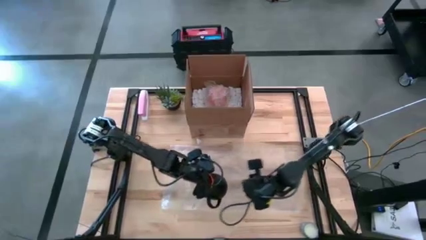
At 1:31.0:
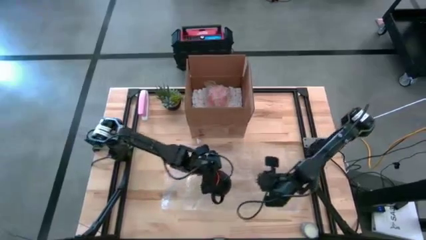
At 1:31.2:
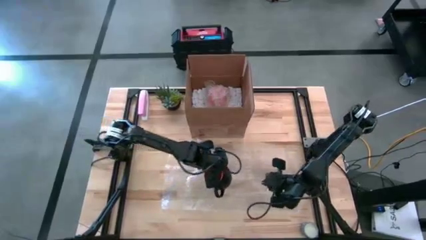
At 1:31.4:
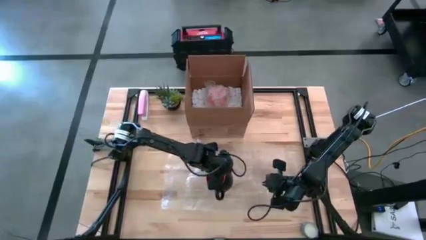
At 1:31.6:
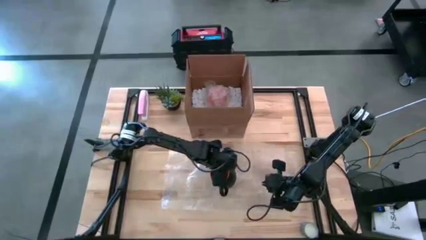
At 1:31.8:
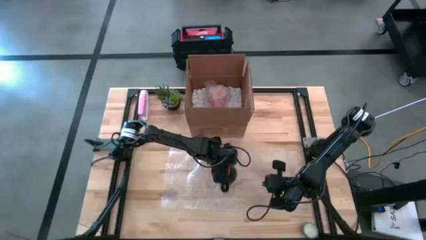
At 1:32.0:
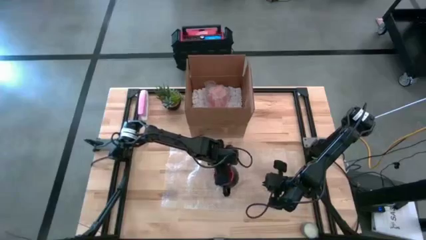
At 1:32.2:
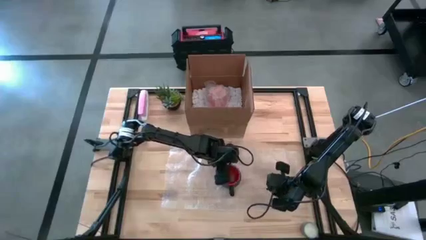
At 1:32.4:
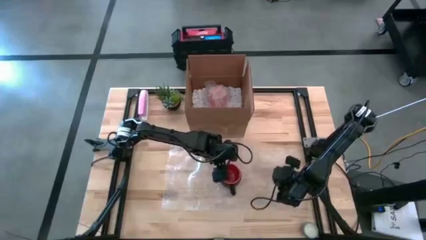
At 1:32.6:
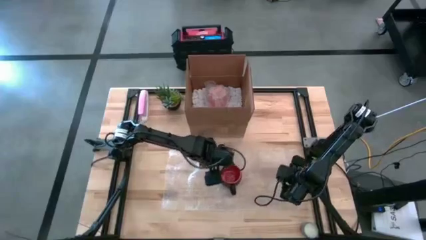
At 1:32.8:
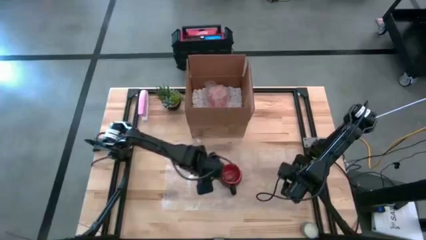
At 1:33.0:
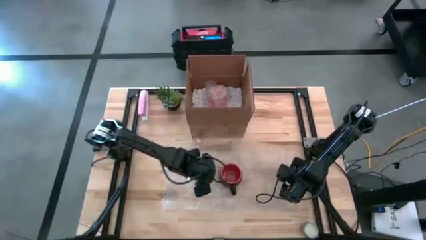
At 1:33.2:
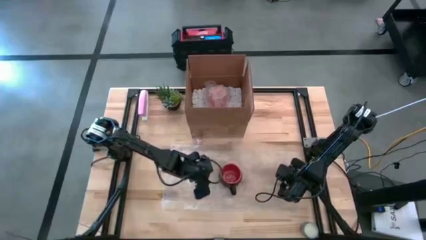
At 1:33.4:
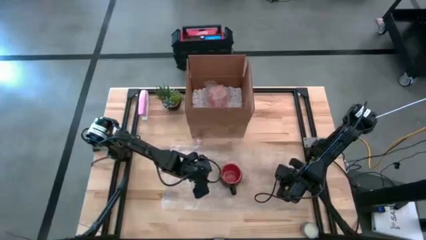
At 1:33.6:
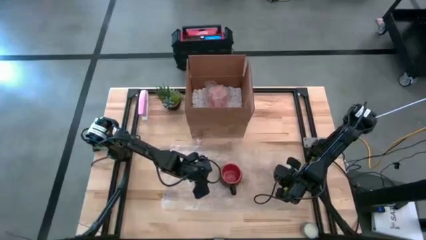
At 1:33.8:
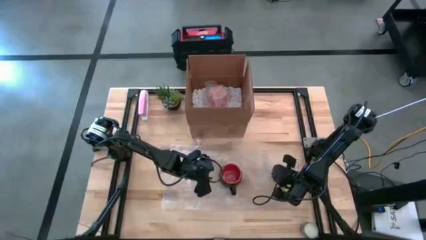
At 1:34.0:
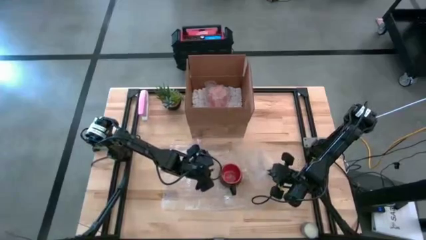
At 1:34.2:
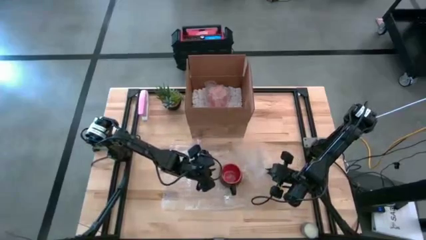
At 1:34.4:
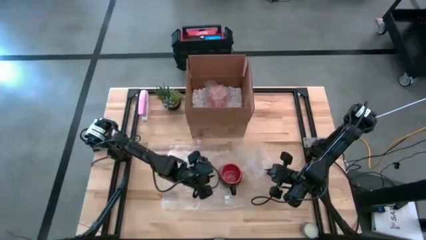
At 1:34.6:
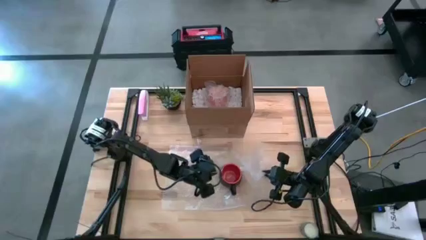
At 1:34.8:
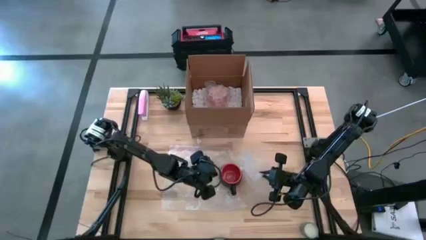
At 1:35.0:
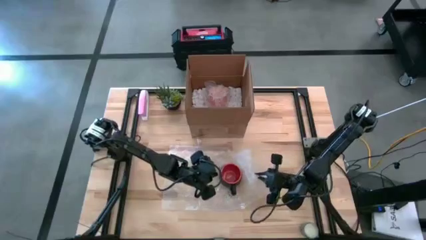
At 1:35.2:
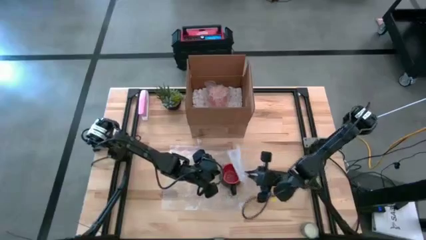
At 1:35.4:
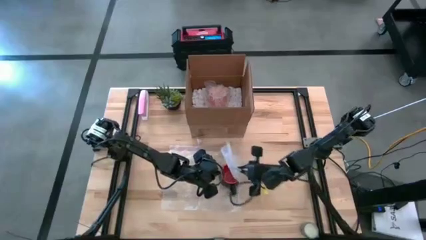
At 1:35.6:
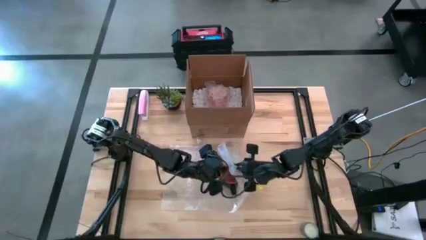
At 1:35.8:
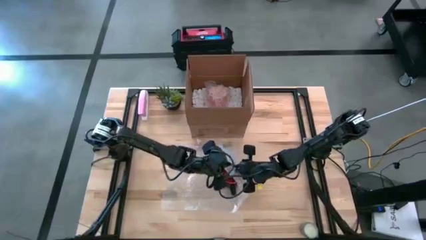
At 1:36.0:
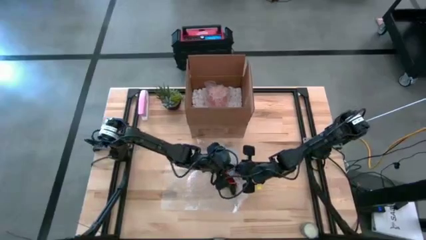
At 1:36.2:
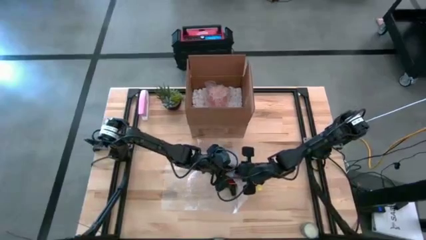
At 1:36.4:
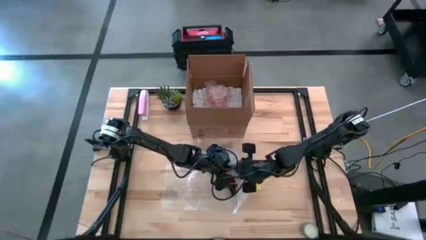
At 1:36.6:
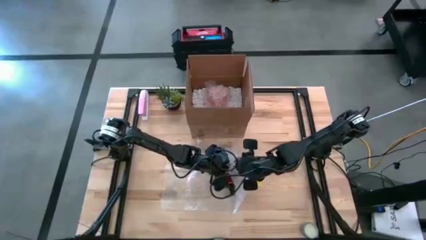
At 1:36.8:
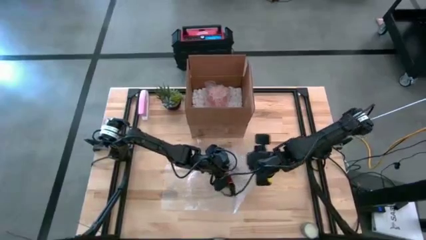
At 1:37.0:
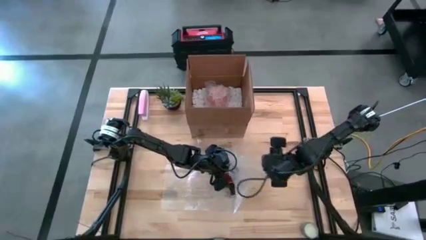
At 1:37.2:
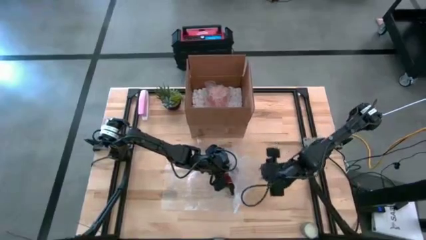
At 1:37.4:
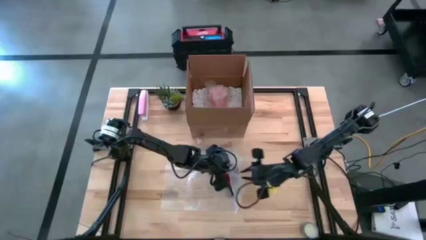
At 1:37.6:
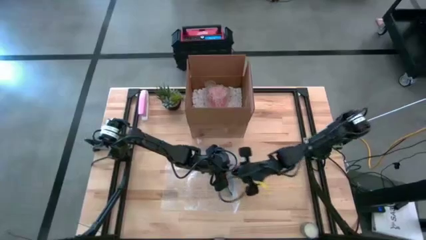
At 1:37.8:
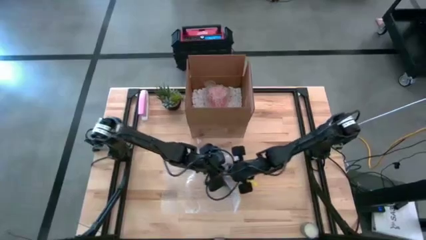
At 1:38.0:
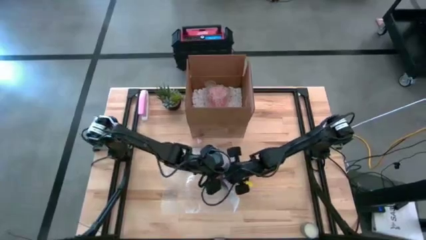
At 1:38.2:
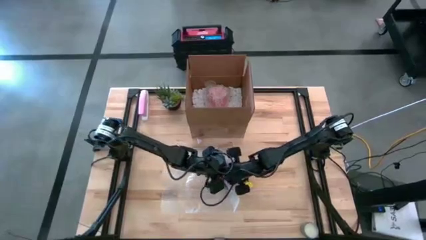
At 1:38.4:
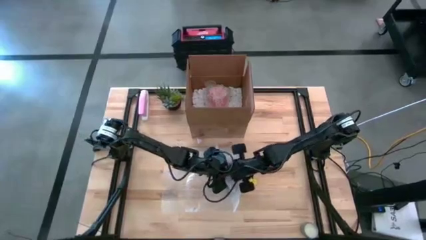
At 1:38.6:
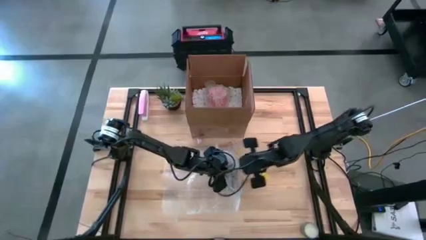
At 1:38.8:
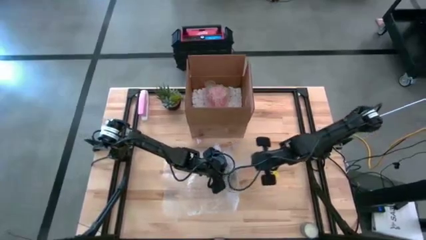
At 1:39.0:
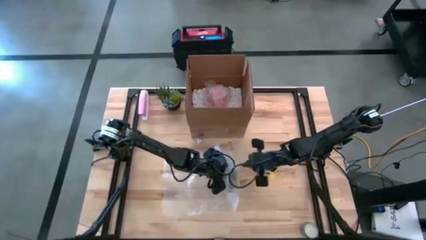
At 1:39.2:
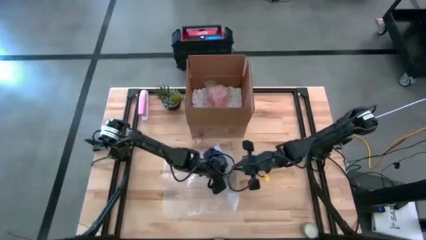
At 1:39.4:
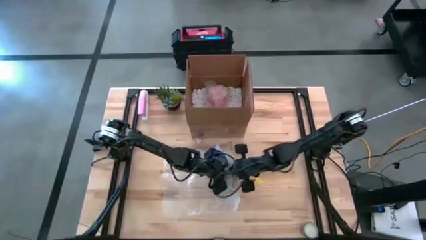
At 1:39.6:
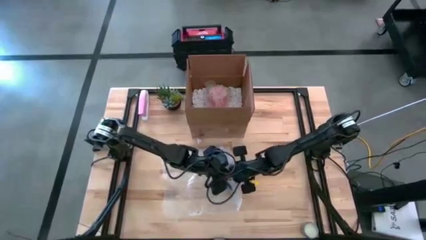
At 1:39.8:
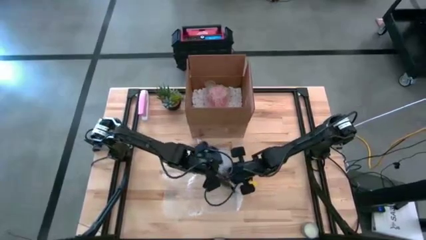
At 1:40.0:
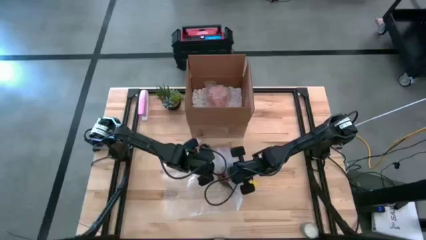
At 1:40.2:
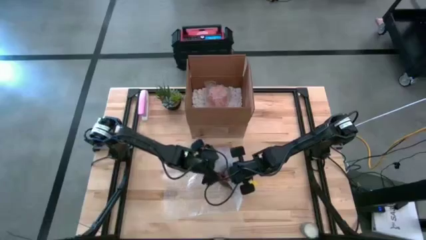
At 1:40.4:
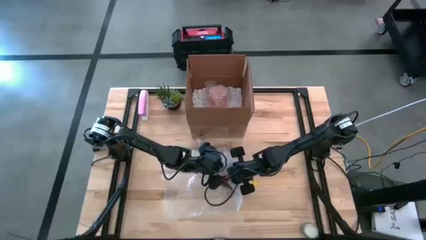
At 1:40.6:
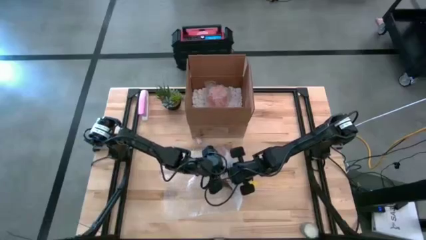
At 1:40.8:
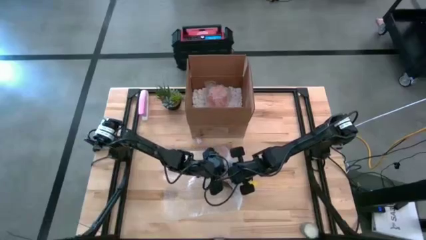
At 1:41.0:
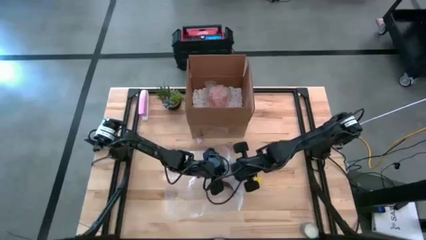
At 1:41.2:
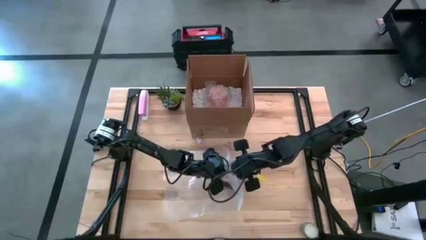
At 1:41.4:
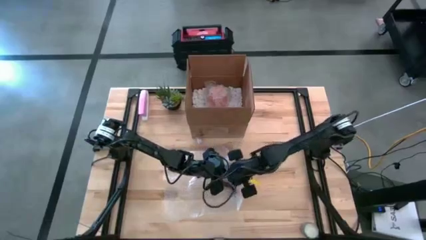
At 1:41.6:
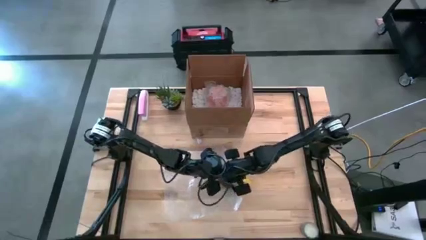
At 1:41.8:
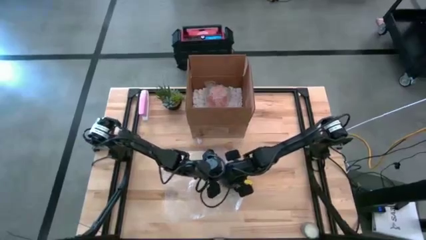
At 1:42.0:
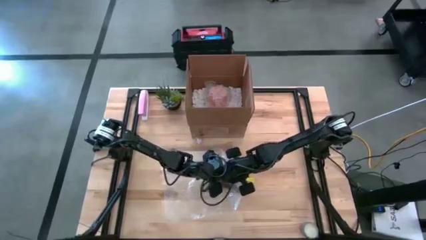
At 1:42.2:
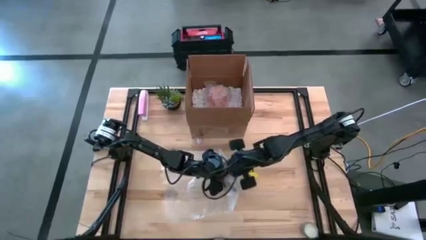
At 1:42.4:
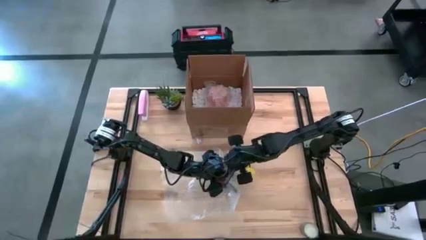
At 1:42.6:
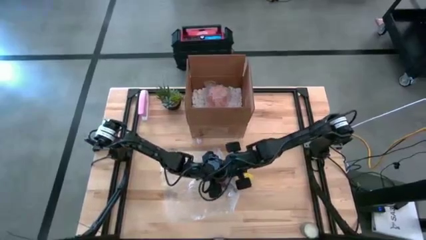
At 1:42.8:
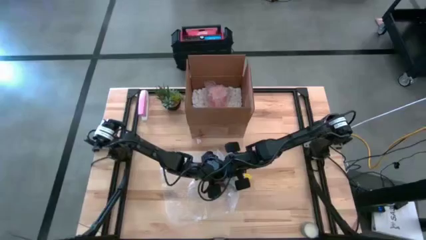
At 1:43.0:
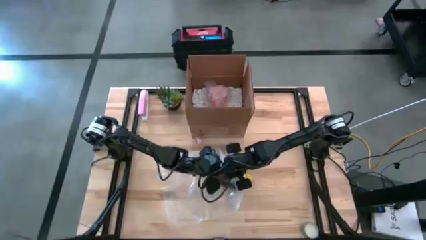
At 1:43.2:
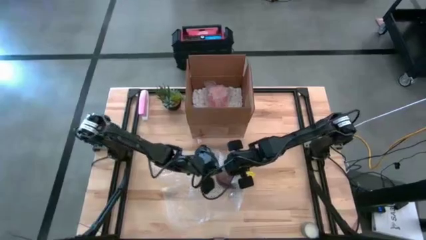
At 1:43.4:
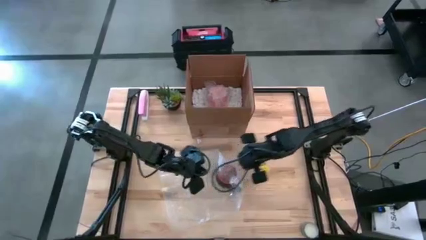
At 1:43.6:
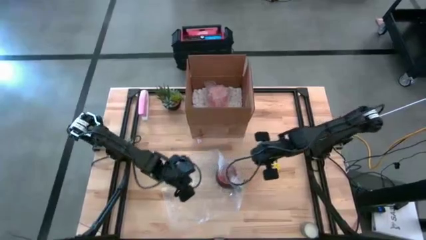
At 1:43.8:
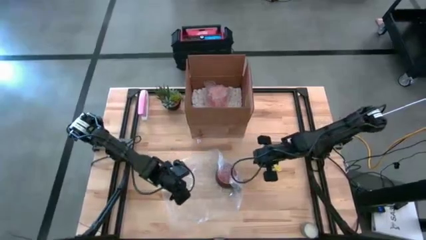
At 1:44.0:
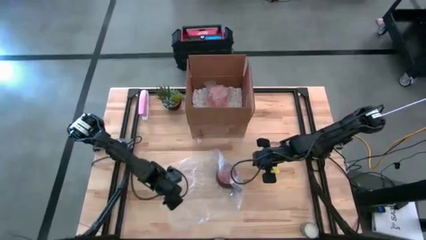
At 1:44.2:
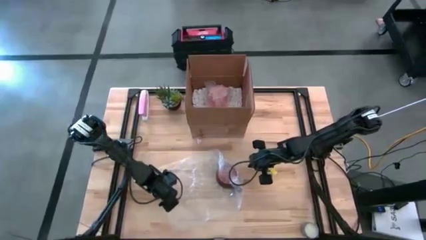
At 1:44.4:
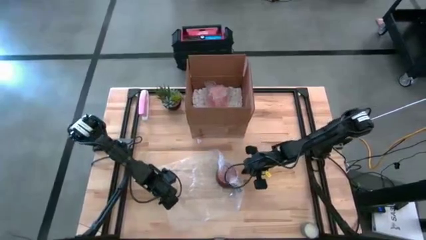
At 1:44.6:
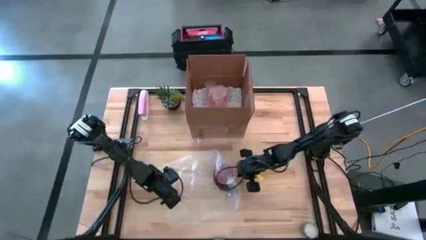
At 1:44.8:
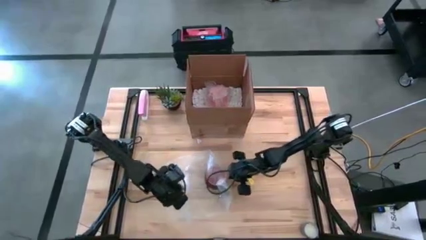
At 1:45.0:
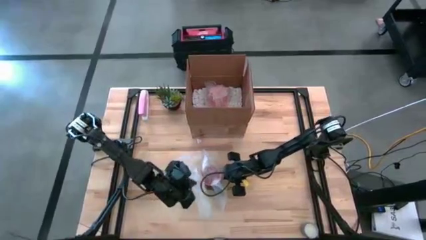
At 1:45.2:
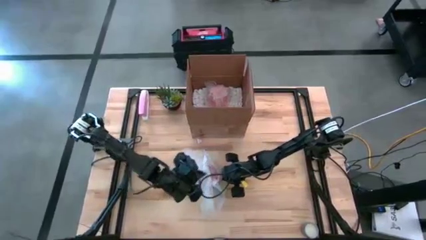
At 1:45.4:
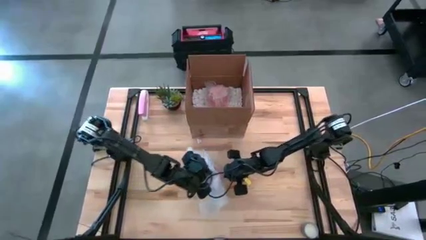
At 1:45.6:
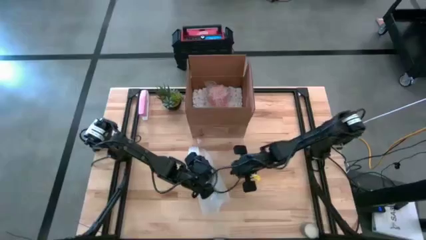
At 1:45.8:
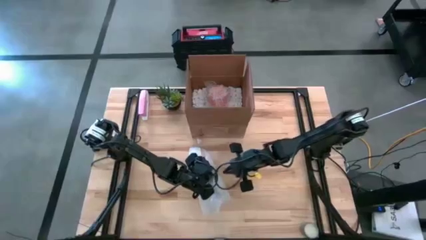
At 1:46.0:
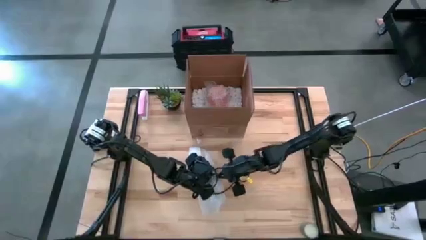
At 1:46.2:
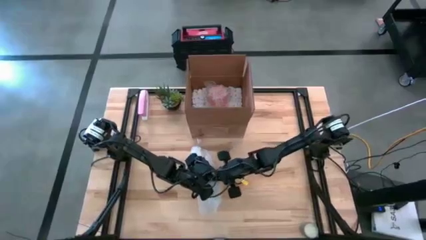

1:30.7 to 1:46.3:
Task: wrap mug
Wrap the black mug with the bubble wrap
